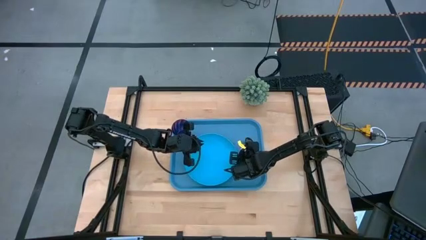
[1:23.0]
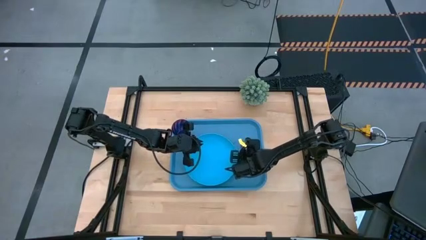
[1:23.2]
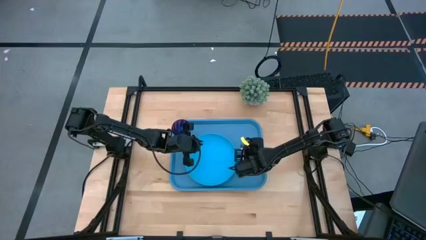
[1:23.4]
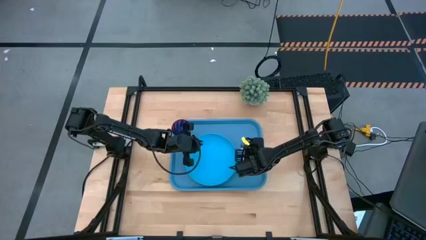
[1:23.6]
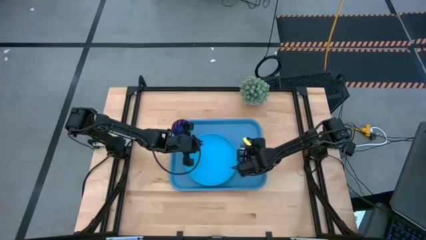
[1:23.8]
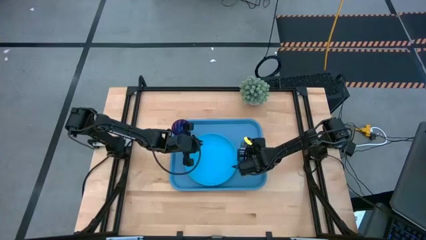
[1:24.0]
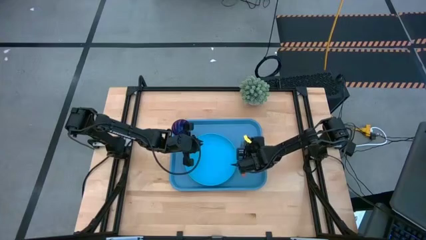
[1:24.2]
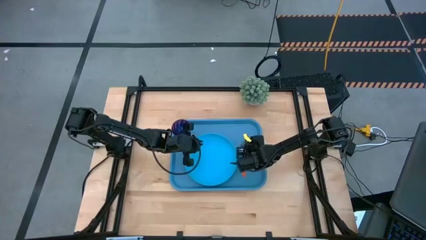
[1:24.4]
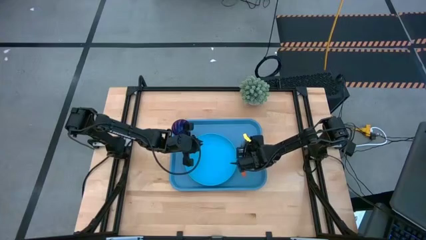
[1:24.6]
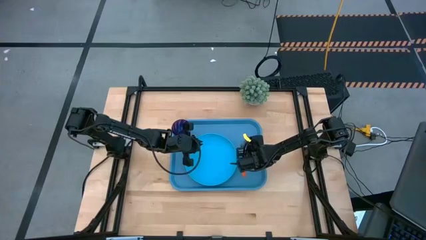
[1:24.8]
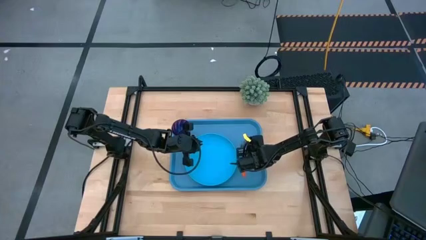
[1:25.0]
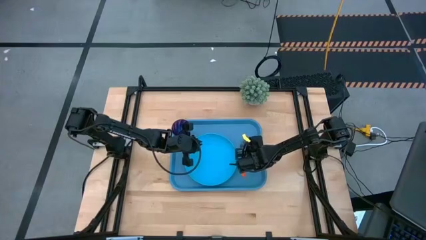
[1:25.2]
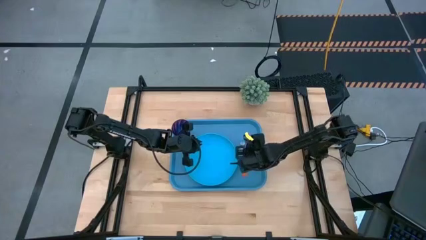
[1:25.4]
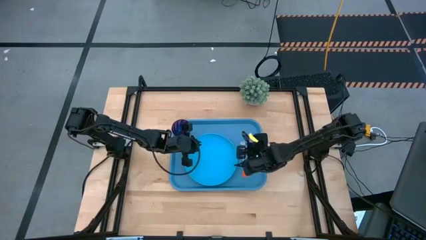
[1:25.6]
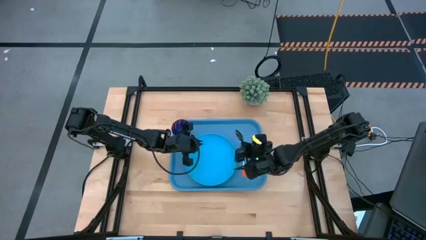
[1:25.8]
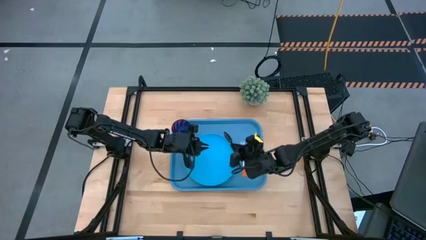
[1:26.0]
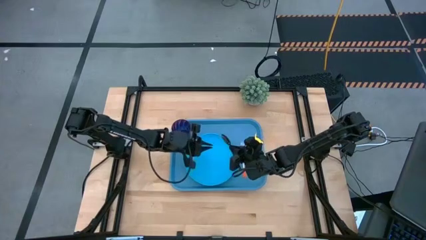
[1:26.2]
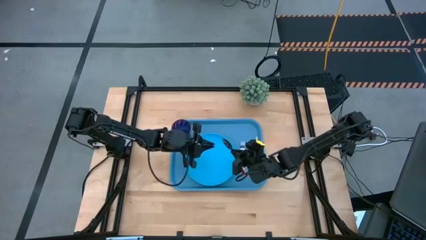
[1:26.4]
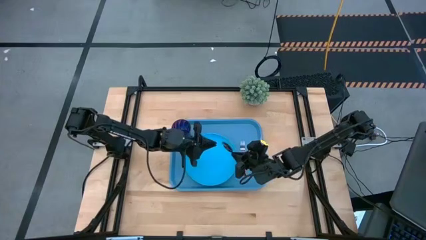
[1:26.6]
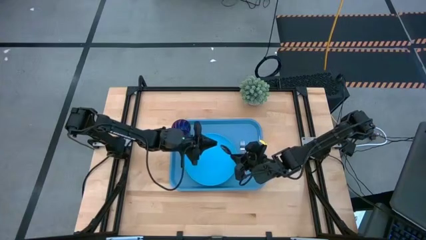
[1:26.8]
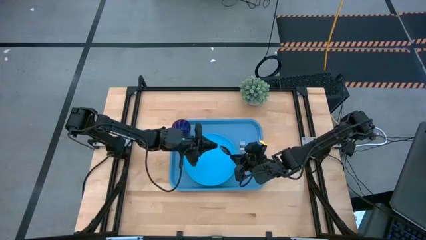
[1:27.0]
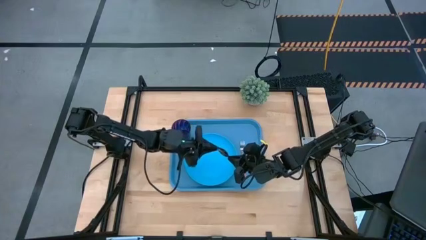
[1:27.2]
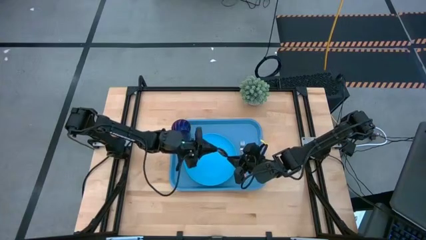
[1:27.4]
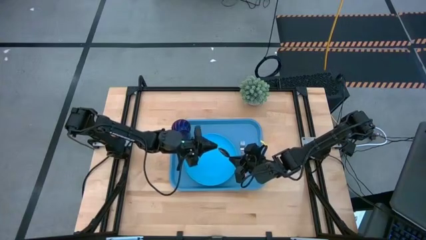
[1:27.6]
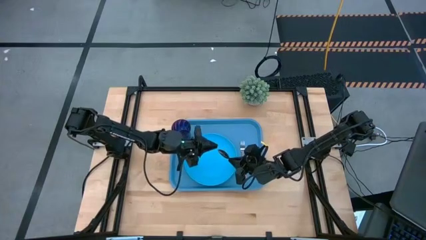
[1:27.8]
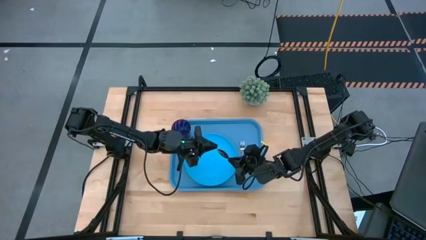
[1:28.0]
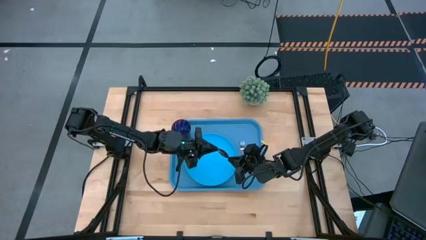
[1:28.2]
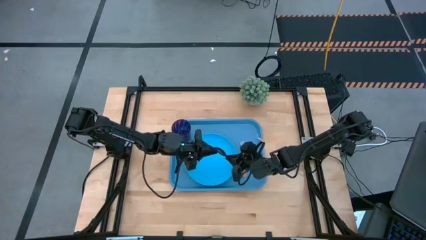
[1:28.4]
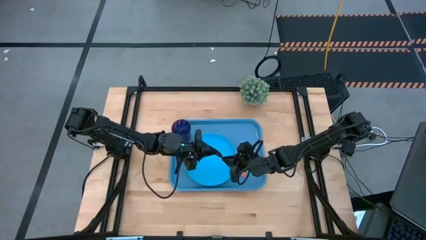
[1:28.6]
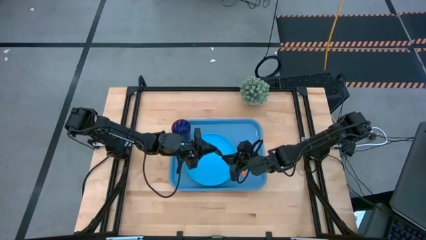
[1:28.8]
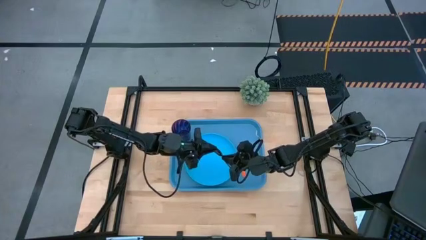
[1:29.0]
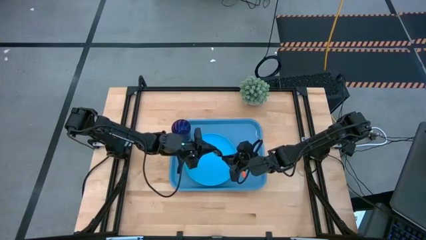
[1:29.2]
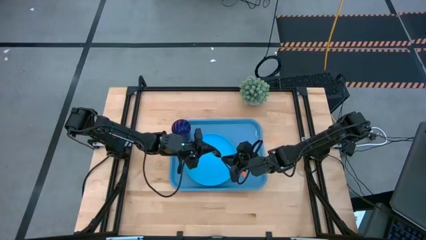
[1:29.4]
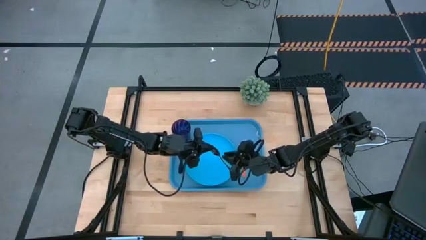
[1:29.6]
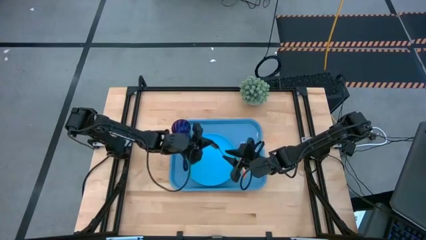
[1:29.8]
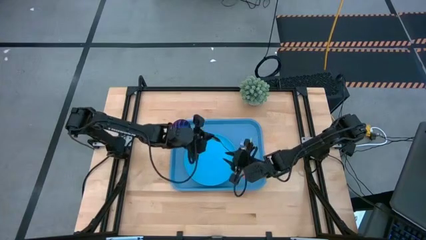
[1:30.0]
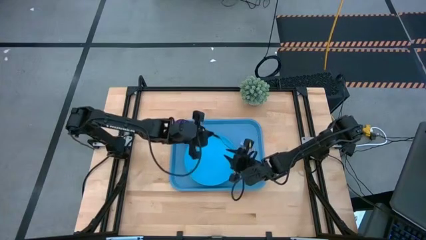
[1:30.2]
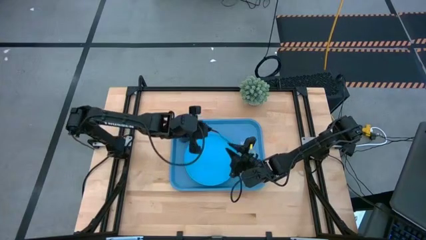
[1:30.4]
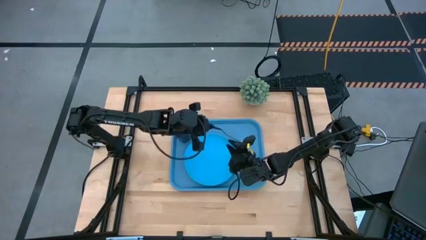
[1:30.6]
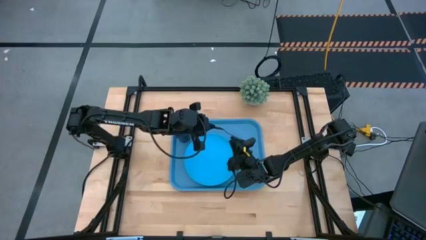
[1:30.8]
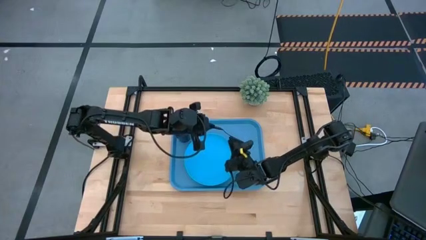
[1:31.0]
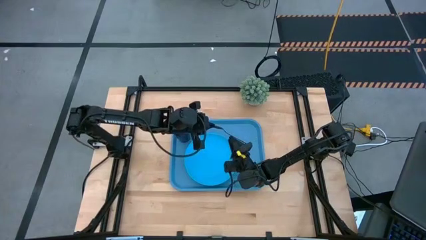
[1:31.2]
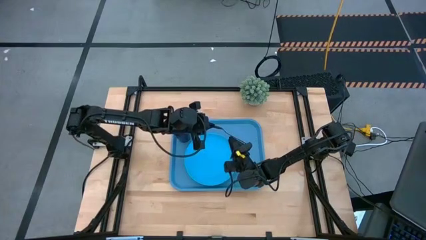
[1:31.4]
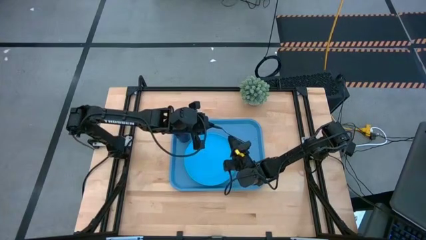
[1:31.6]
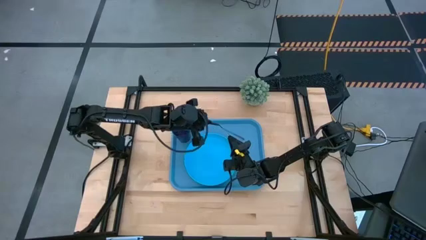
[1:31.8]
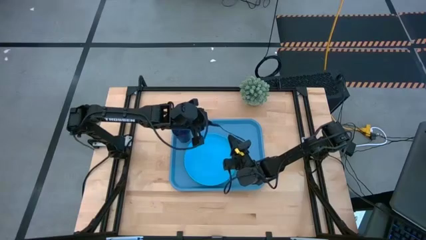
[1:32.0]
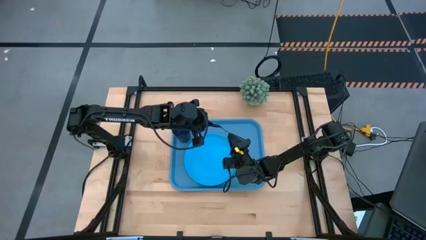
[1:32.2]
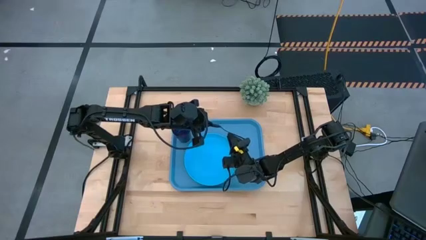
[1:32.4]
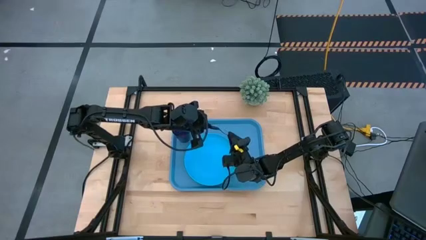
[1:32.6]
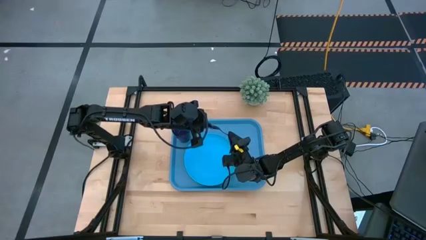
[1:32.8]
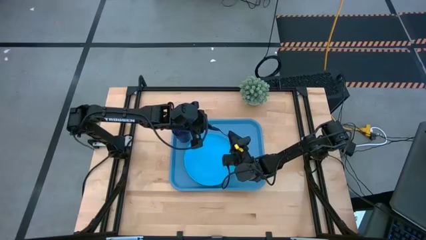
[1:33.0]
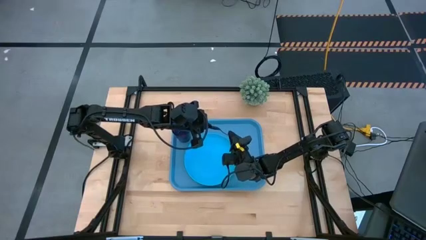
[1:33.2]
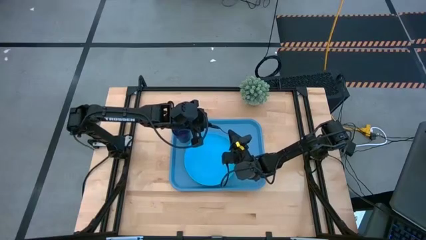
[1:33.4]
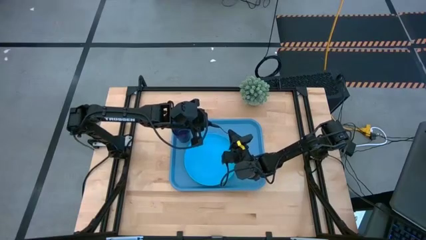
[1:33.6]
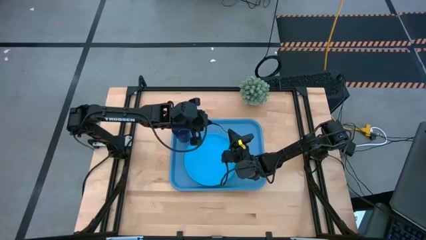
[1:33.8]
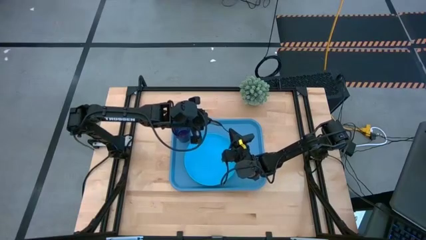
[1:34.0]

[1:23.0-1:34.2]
Task: Pick and place plate/cup/fork/spoon on tray
Adjust the black spoon

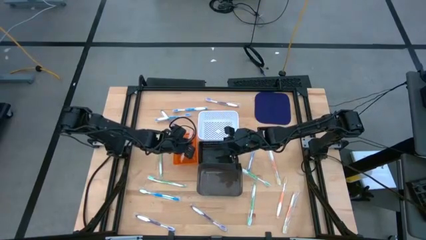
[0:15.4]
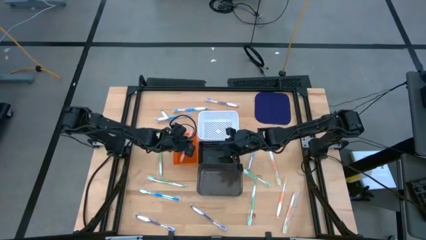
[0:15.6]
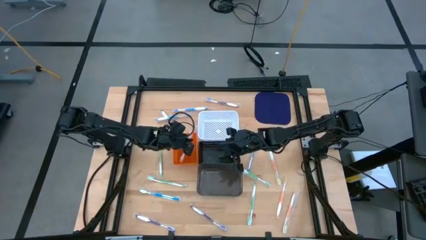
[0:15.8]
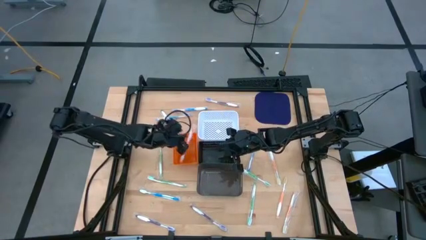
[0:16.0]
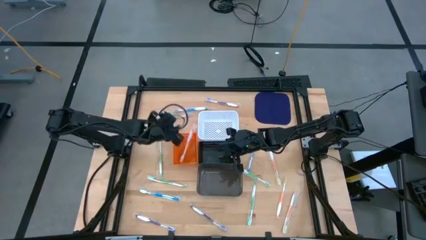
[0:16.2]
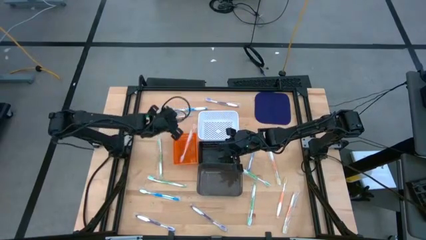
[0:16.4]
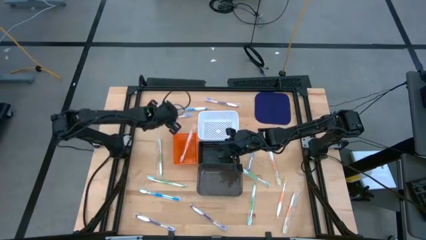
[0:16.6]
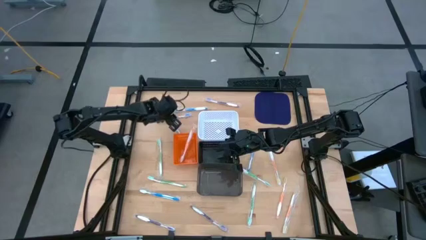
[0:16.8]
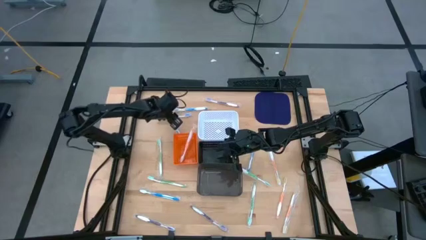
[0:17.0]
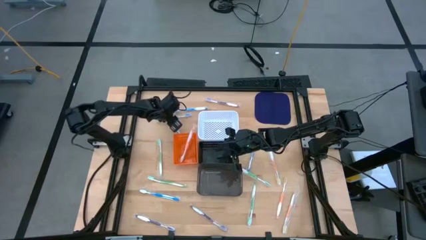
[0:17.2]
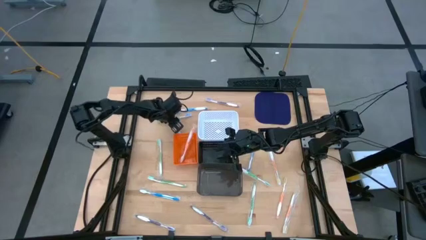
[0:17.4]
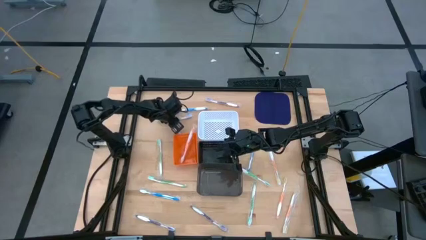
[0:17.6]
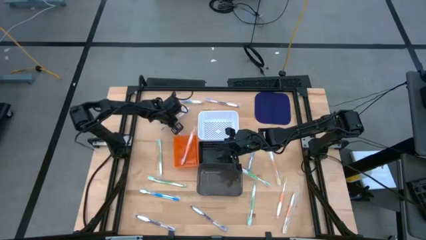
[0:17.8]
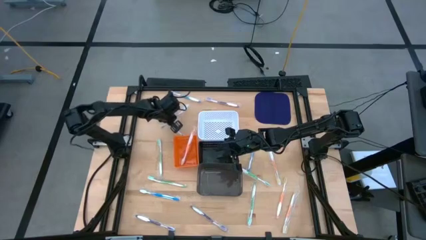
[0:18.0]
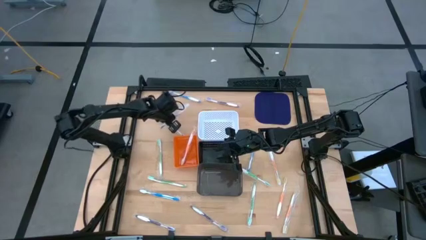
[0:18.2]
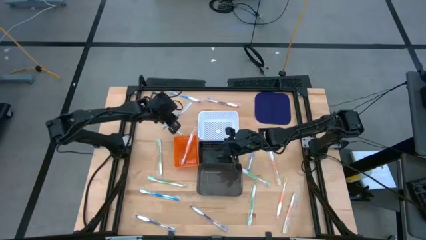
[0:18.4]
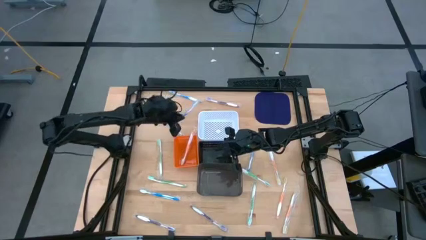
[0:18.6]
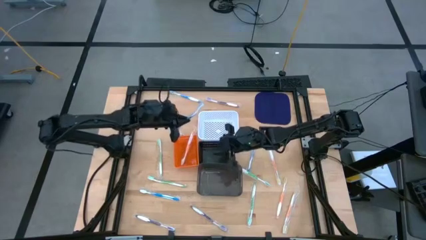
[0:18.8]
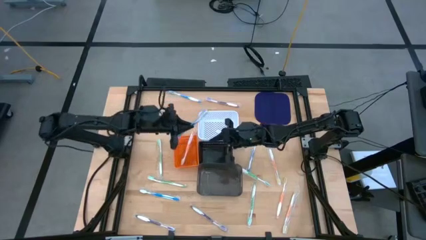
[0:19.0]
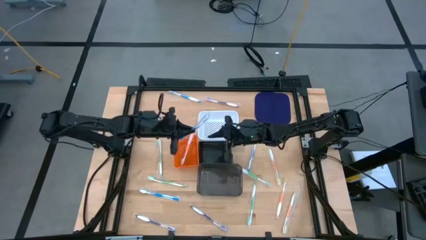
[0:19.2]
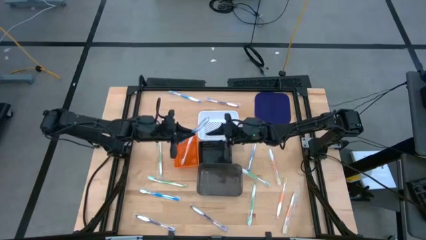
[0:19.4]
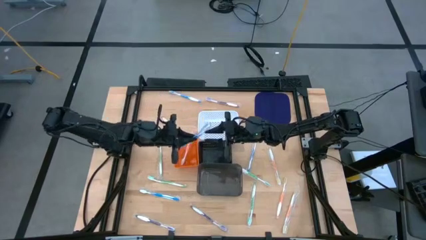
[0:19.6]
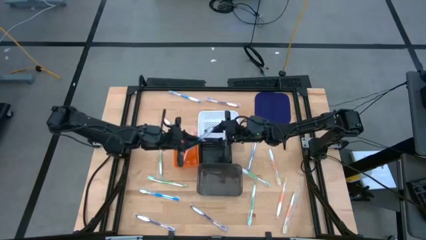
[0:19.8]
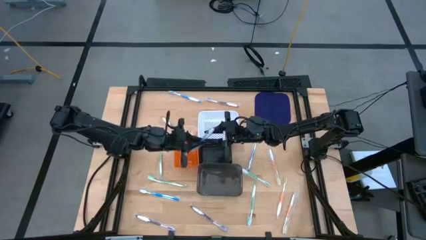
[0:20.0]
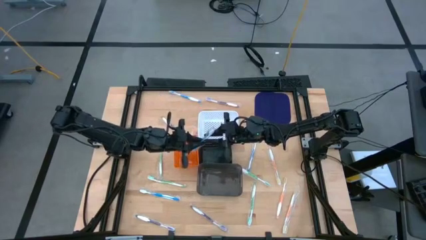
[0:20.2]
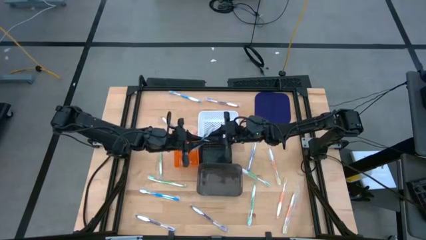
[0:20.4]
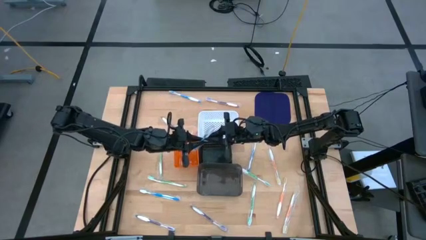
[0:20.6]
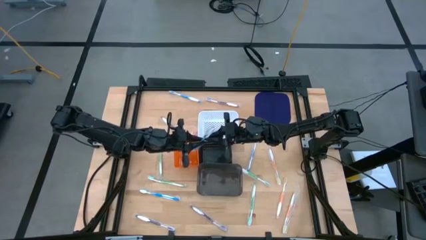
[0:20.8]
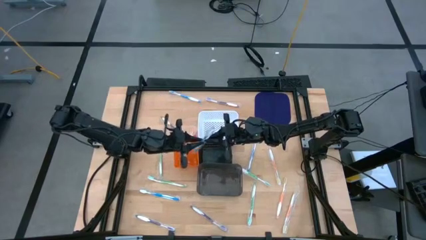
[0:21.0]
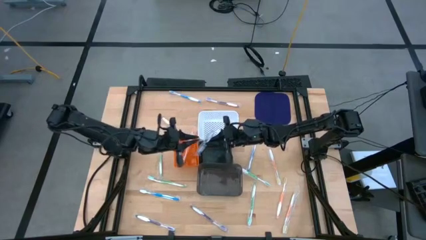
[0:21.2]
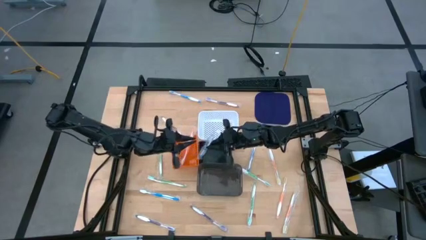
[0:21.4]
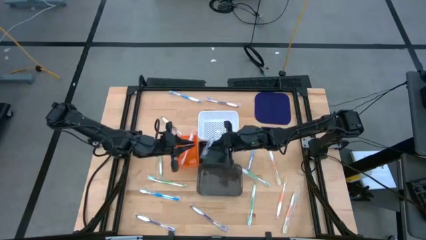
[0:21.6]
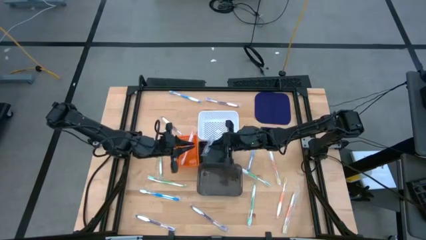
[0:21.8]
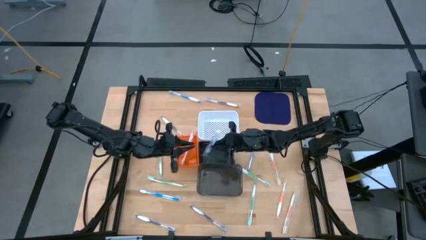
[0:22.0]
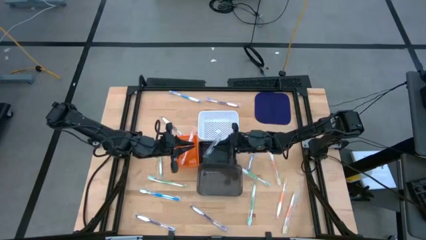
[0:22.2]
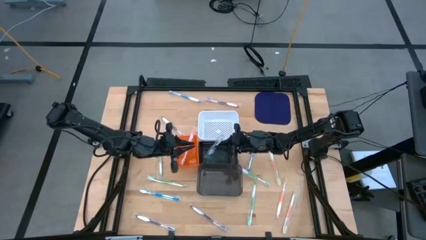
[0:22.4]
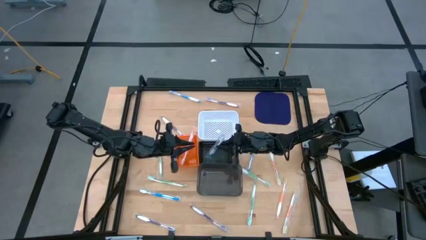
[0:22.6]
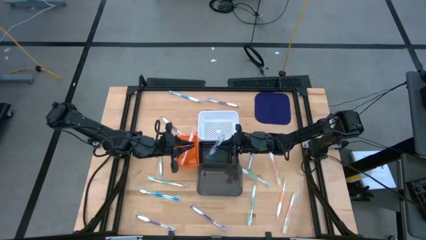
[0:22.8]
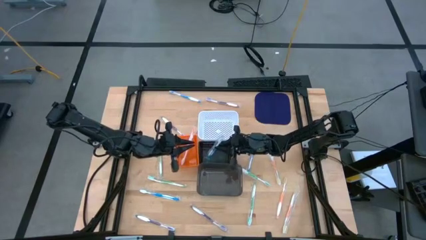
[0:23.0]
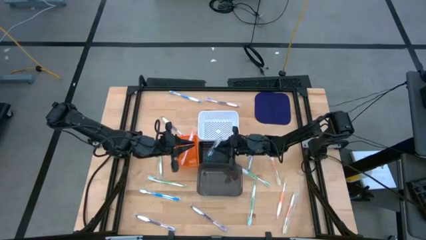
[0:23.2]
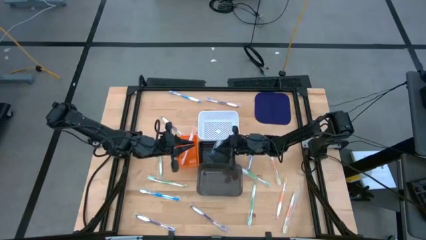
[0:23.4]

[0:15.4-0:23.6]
Task: Pick & Place Toothbrushes
Put the blue toothbrush into the top black bin
